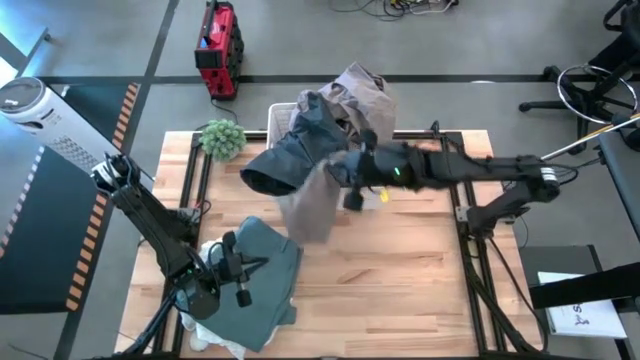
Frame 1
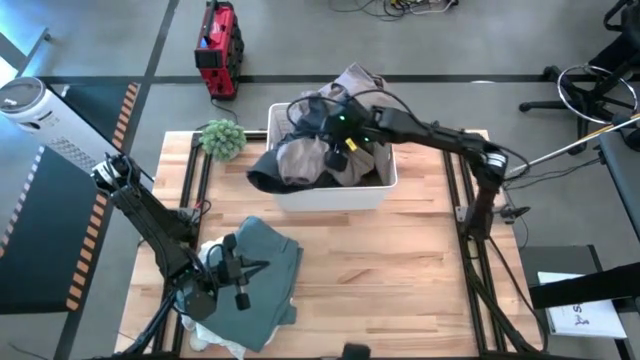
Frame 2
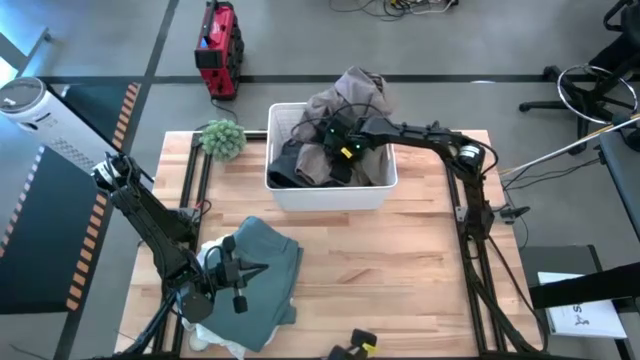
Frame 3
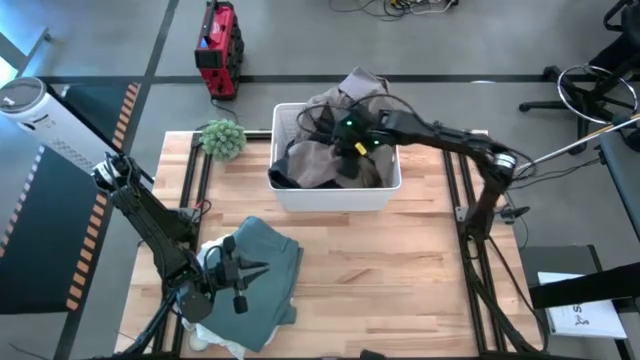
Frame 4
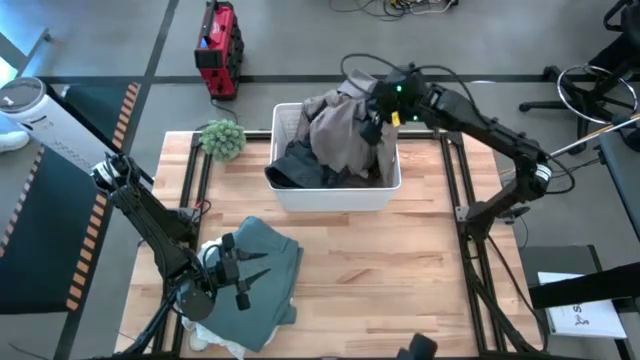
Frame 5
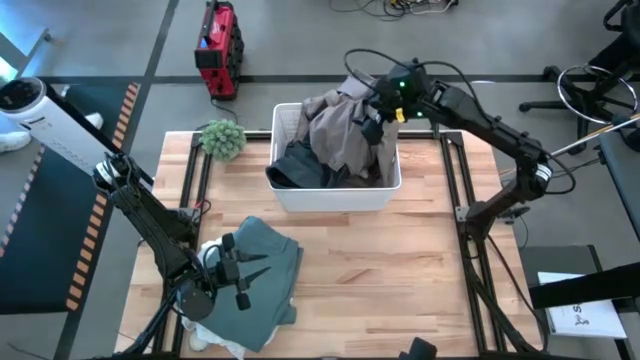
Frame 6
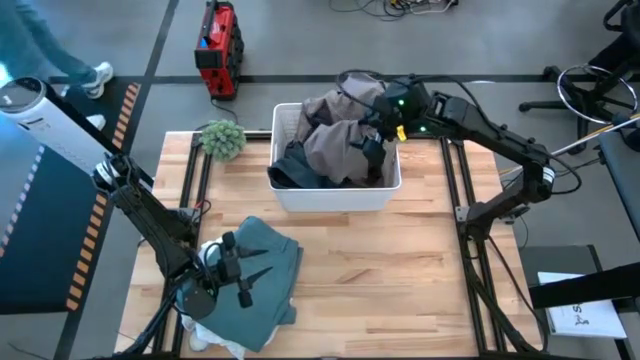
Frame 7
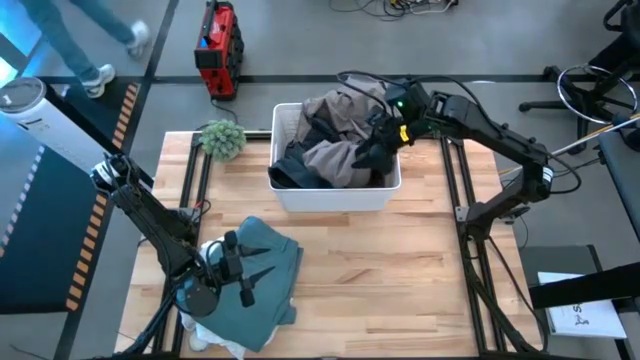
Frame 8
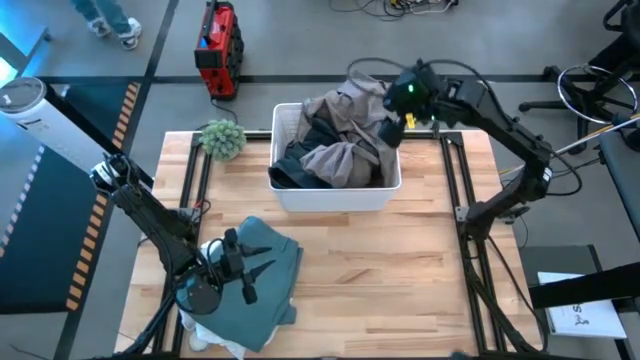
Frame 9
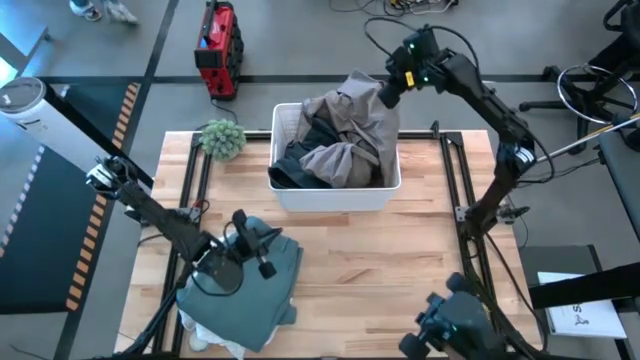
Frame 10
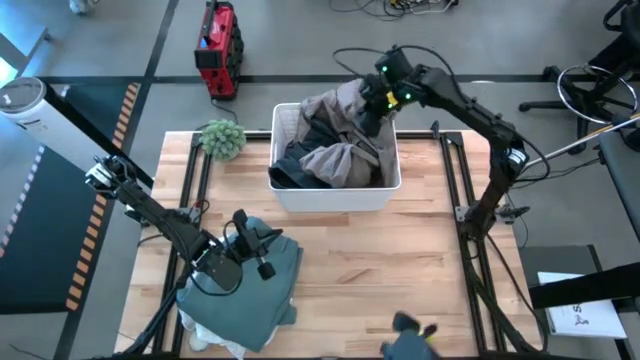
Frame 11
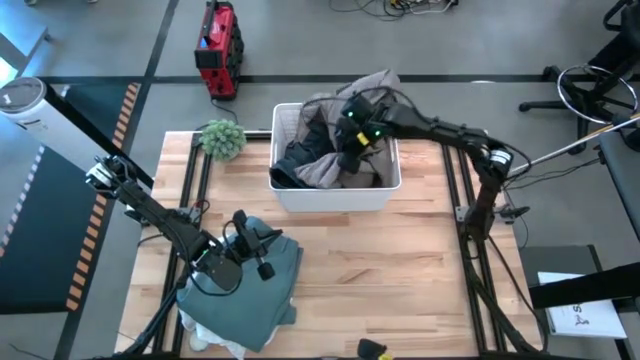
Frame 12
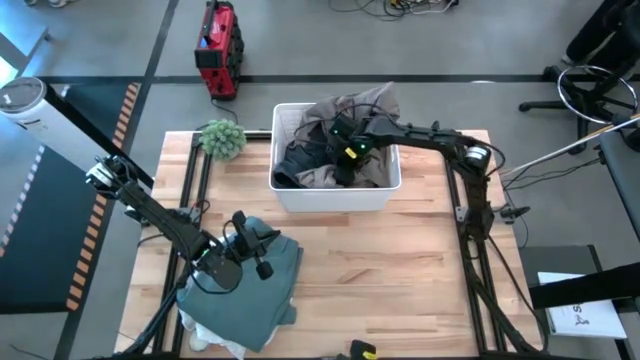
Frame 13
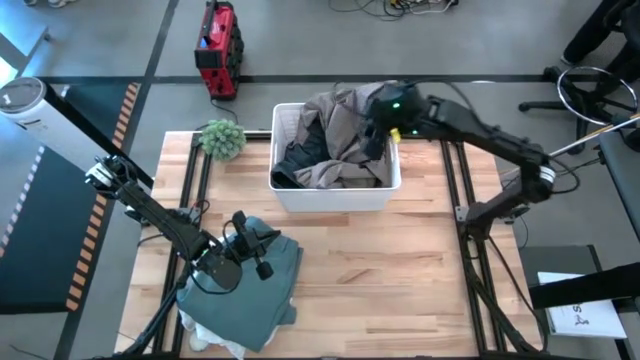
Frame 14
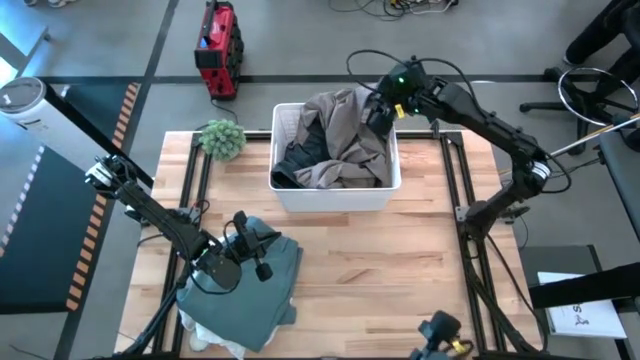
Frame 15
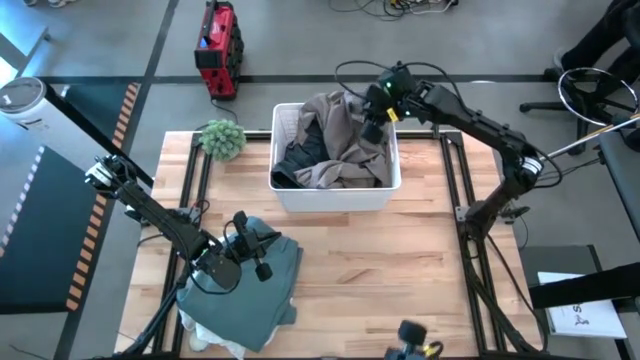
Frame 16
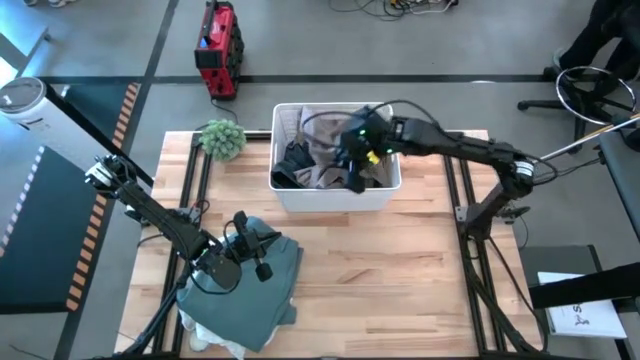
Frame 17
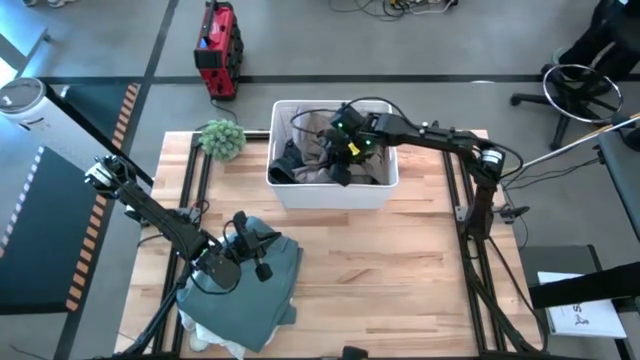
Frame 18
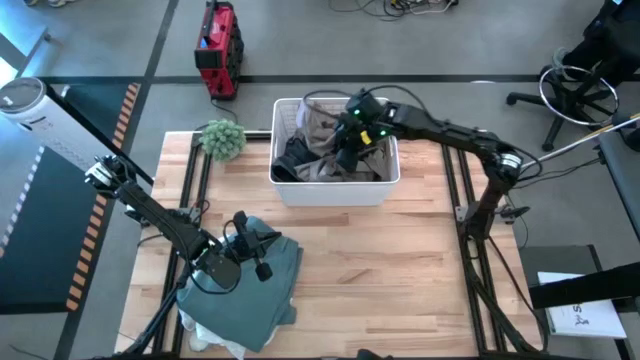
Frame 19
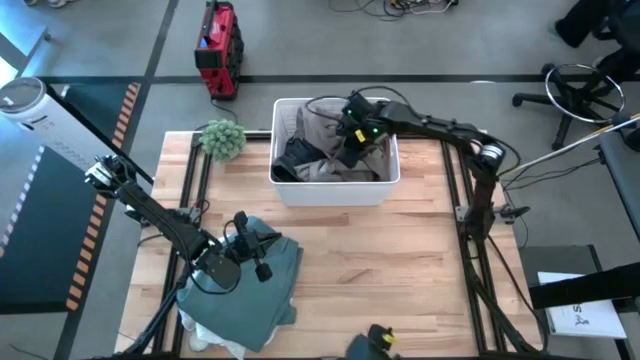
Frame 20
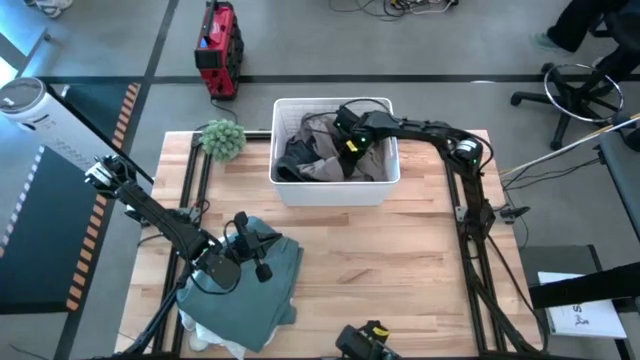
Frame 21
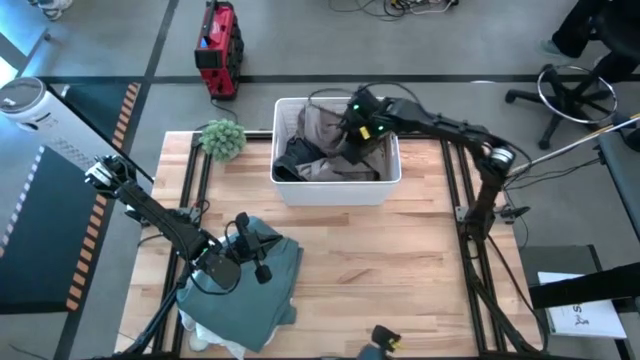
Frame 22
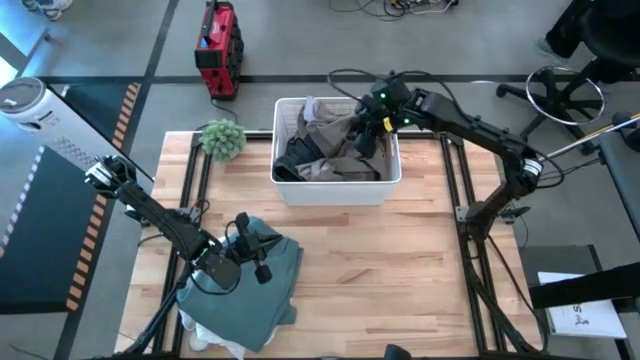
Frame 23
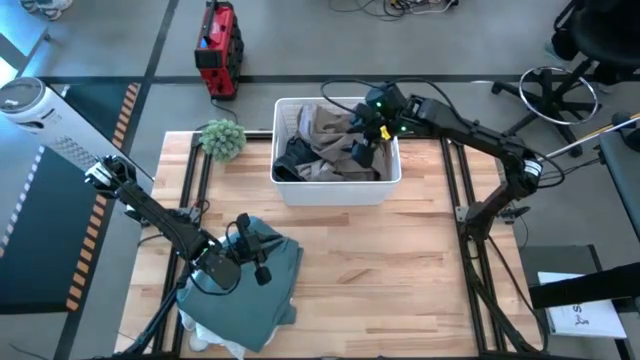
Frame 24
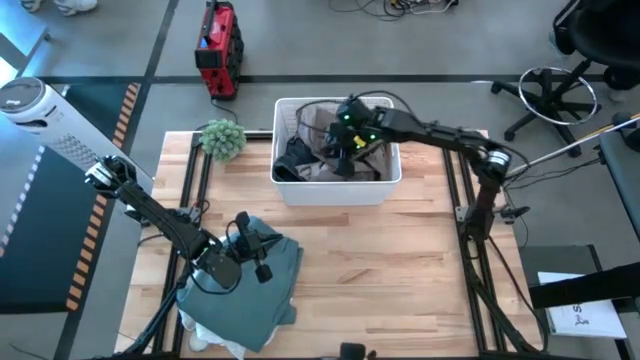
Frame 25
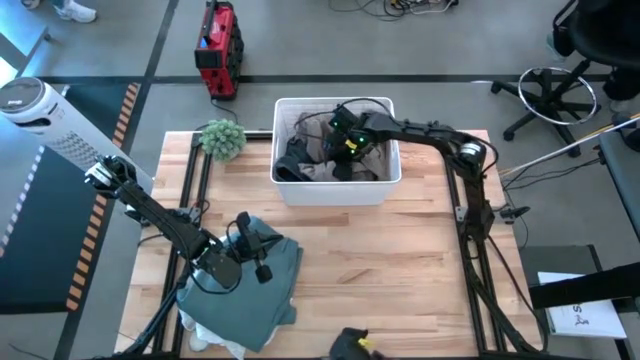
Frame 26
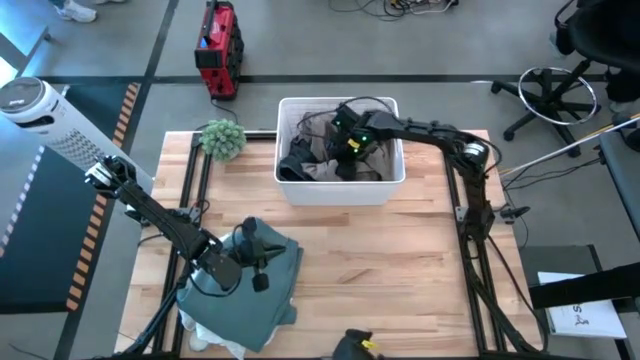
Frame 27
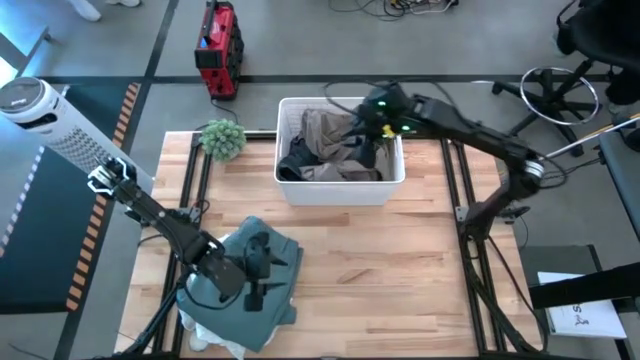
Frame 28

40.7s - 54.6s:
Task: Sort clothes
Put the gray hoodie into the white bin

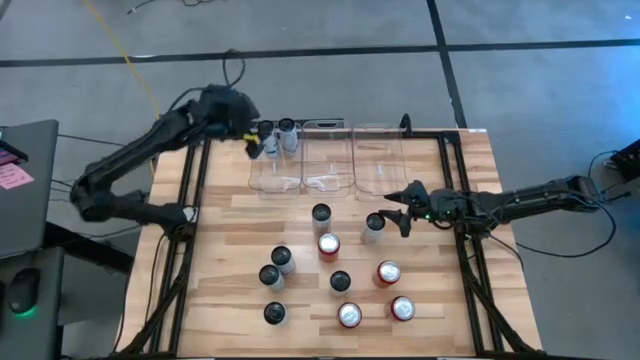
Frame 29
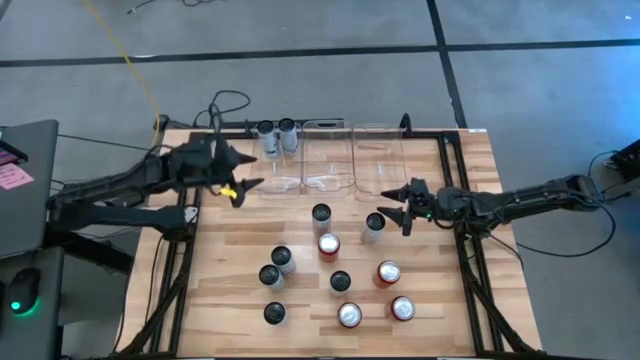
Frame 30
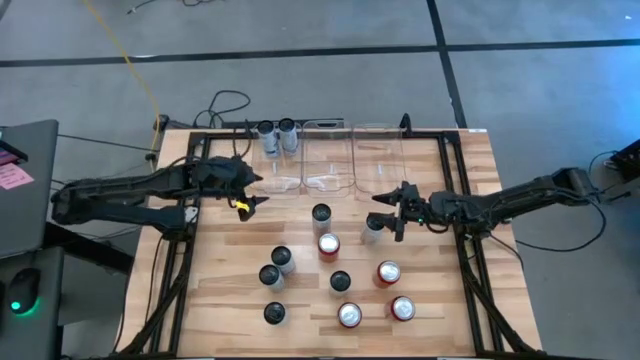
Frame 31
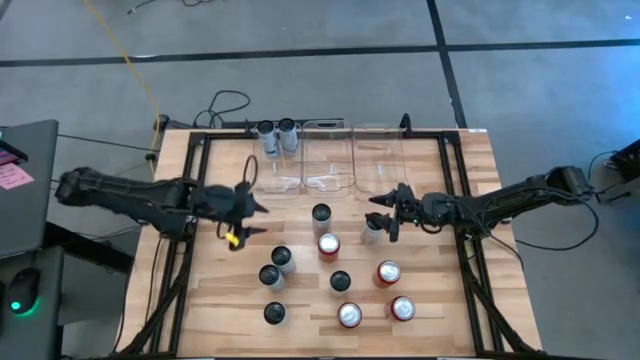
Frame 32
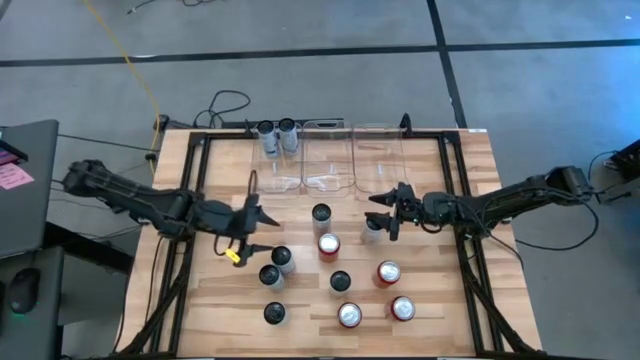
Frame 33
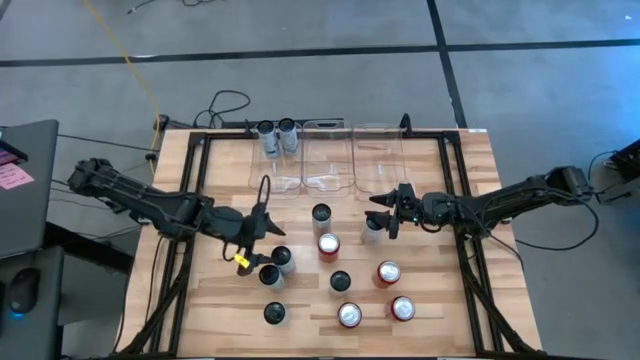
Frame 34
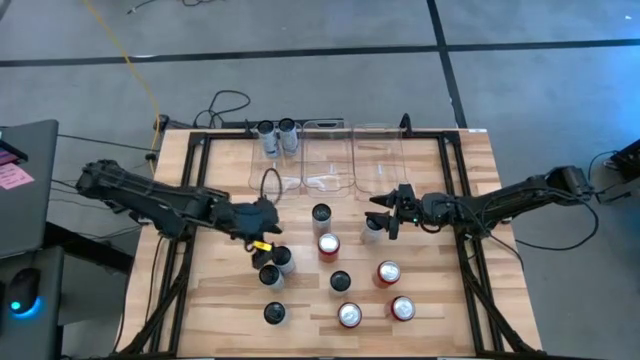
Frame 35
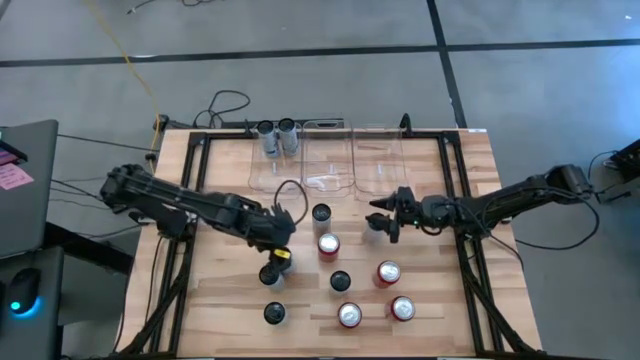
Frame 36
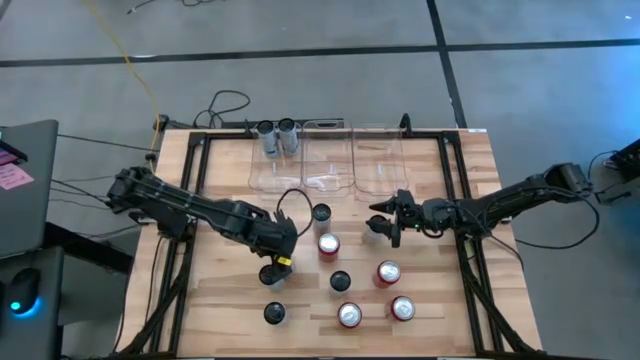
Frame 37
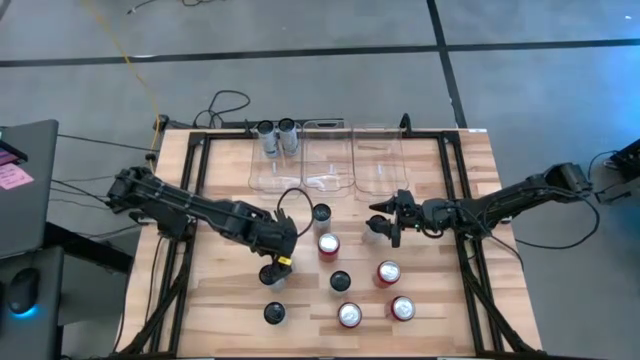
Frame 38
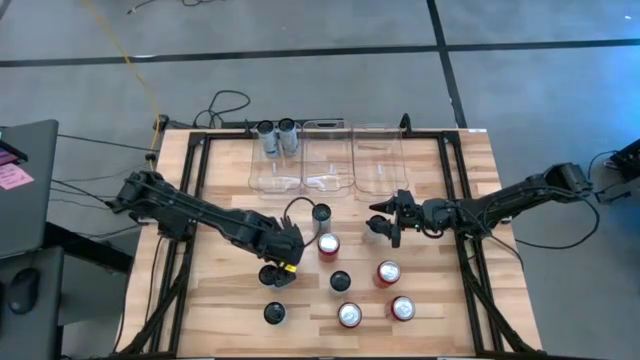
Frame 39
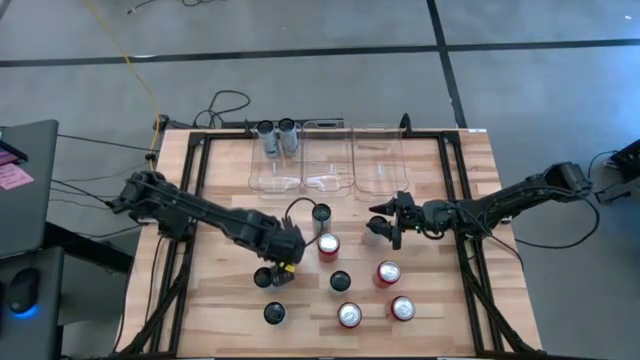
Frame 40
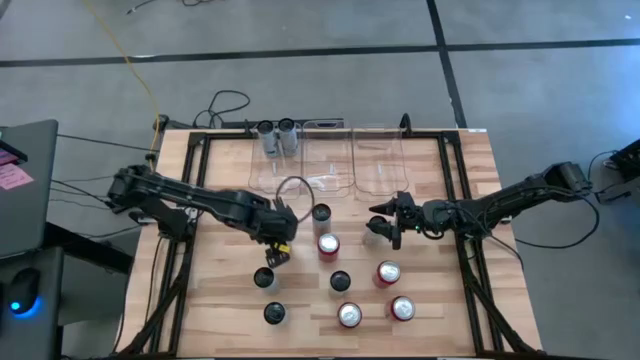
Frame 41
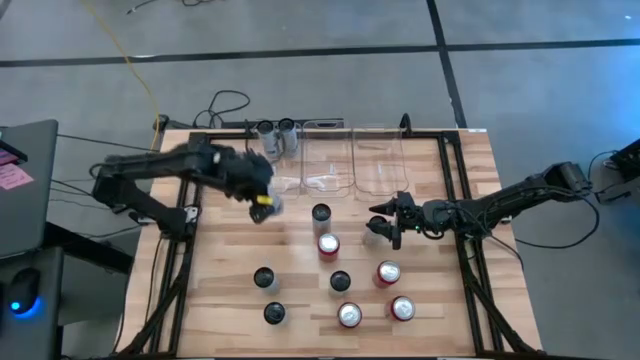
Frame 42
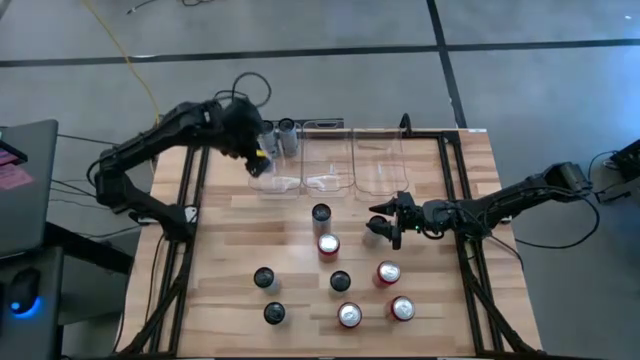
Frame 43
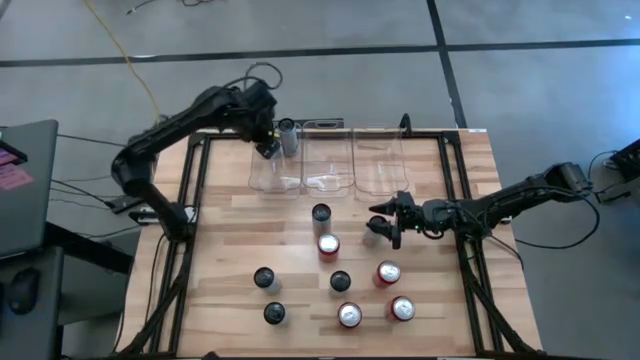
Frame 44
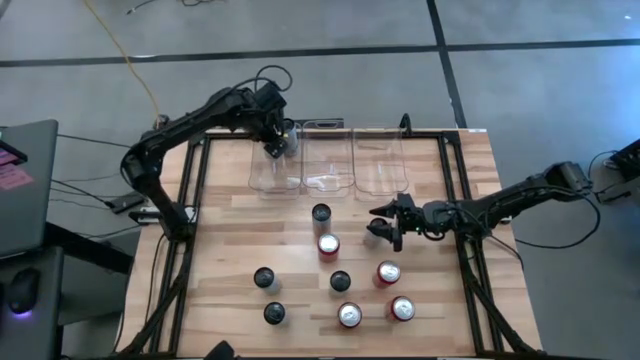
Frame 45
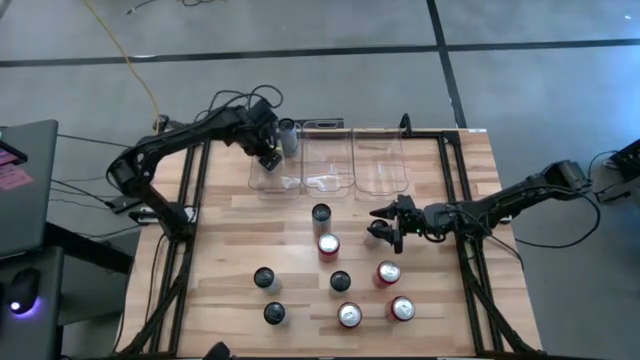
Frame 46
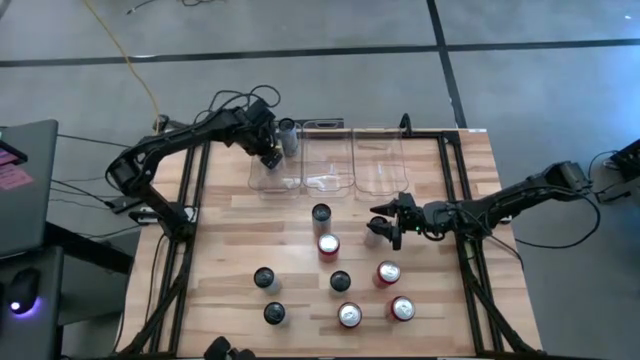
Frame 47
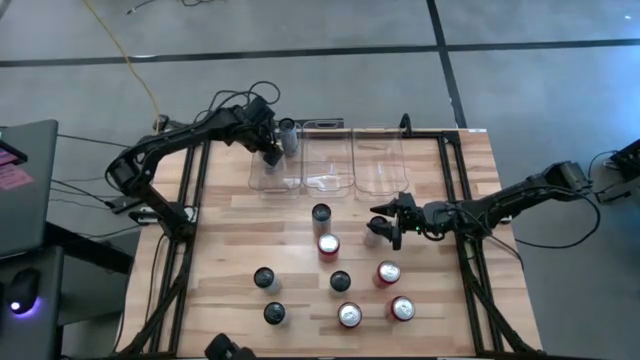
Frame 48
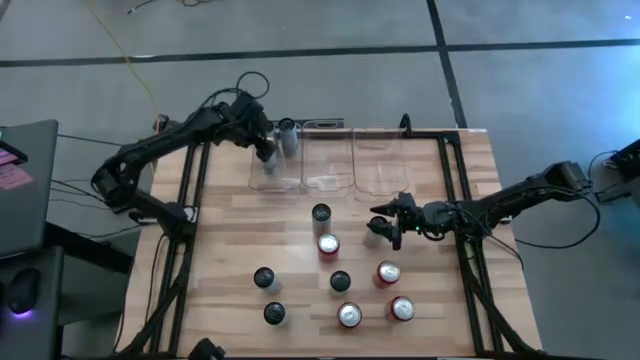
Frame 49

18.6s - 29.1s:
Task: Sort soda cans
Put the white-blue soda can into the left transparent bin
